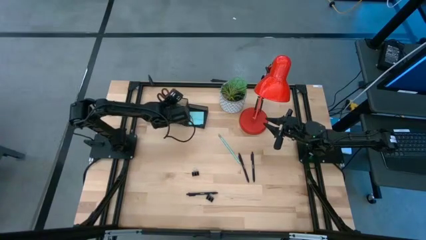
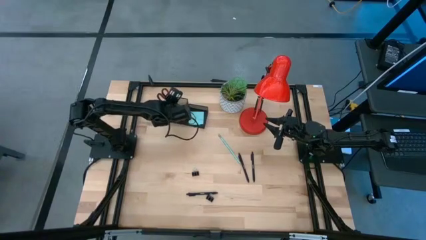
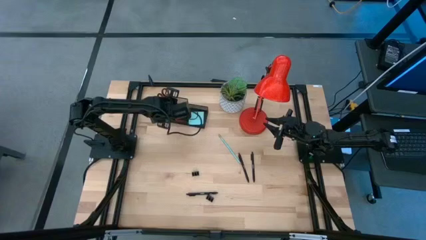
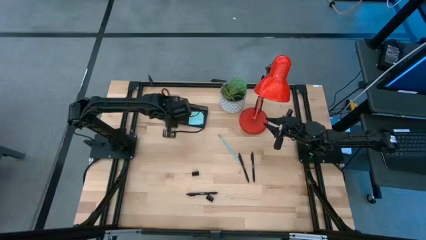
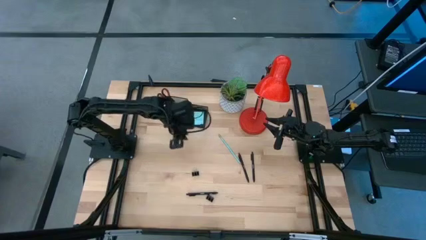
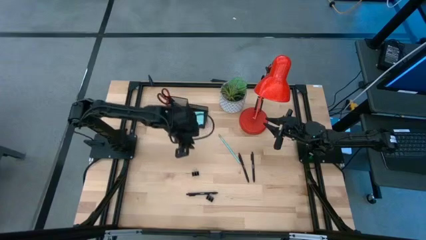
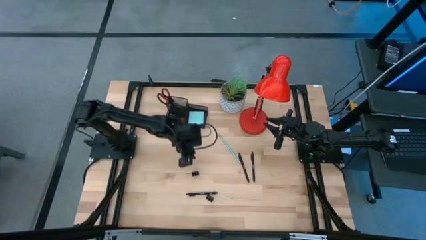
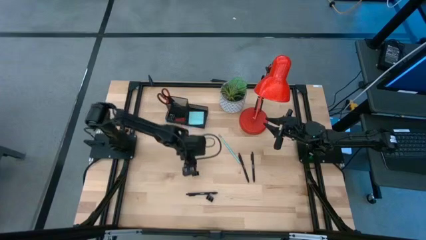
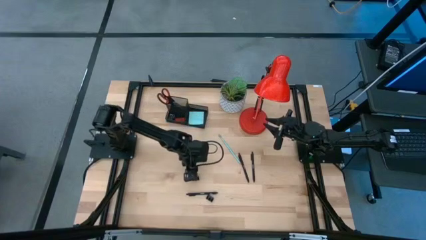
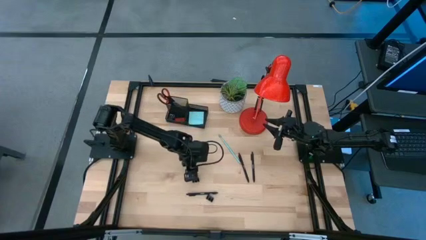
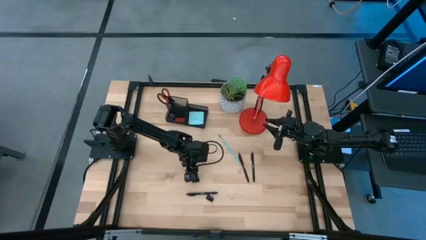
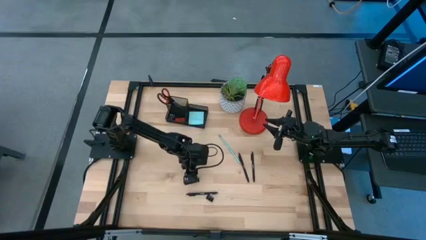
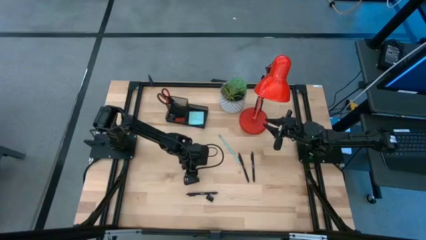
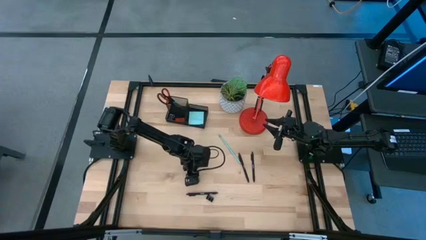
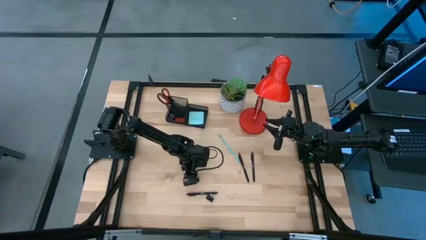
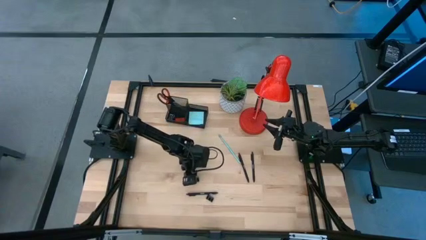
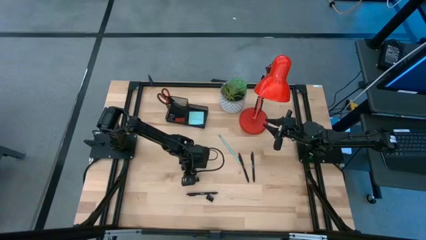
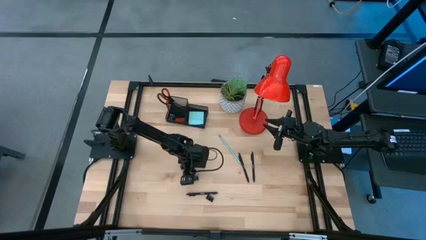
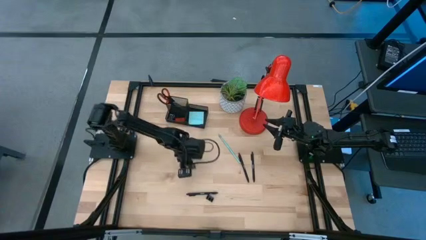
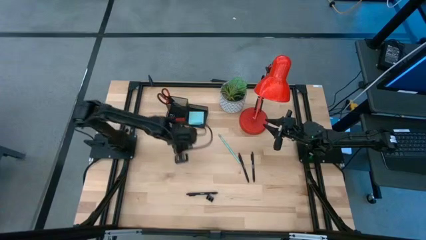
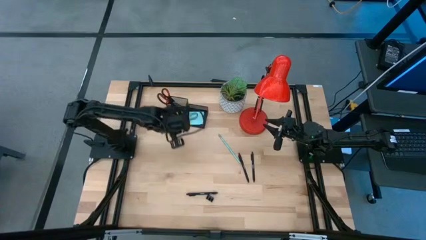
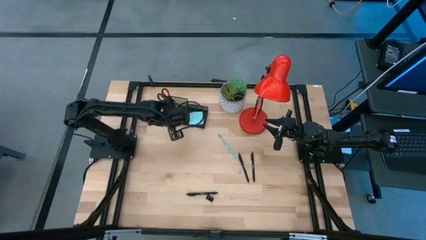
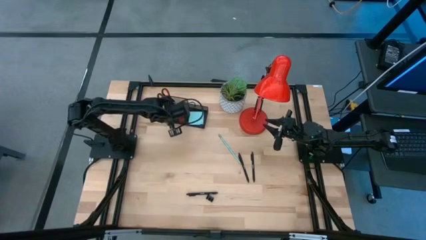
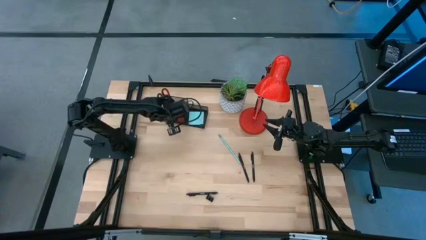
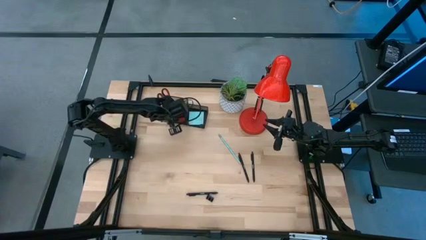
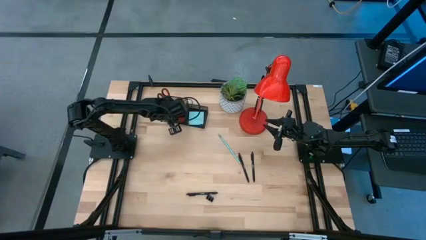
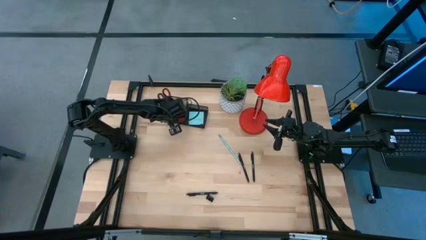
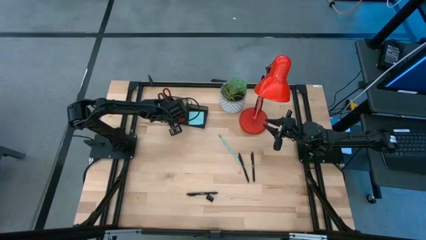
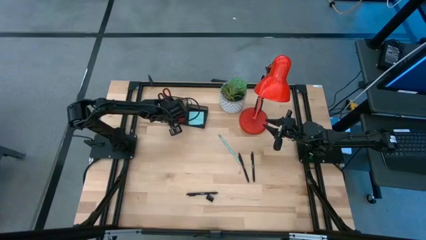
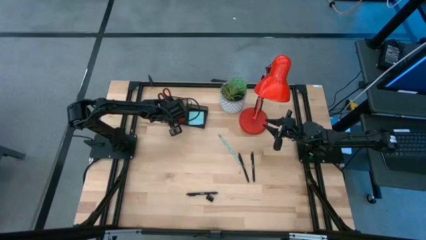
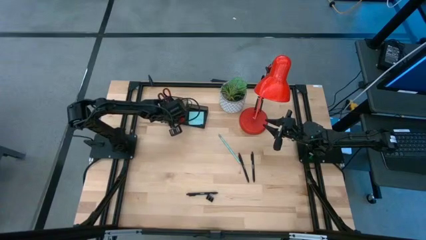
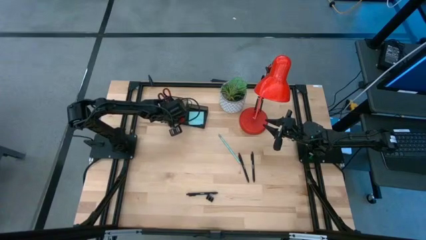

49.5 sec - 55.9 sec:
Task: Pick and place office supplies into organizer
Put the top black binder clip into the black desk organizer

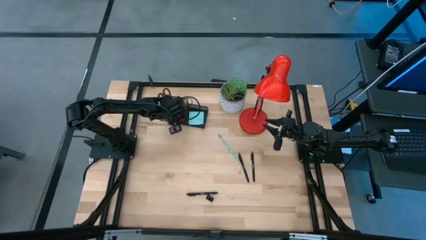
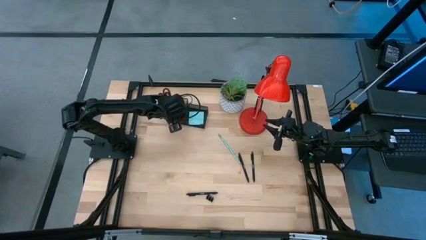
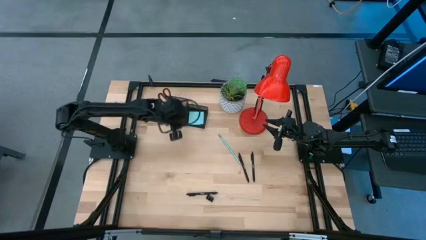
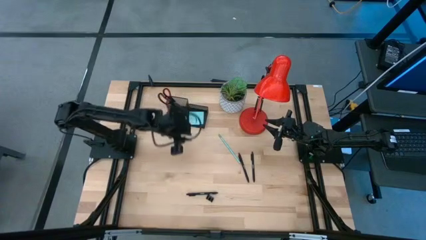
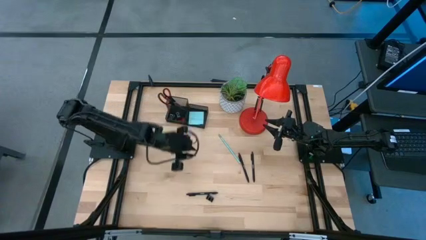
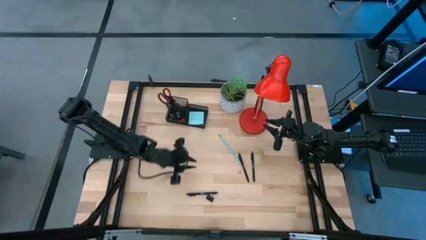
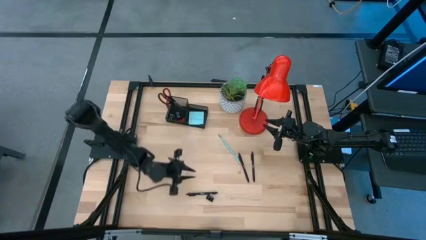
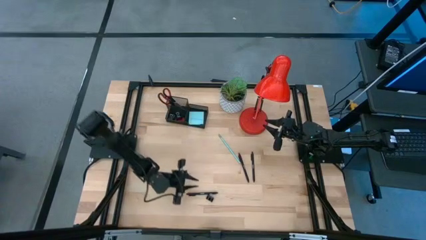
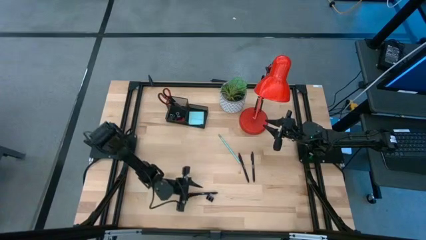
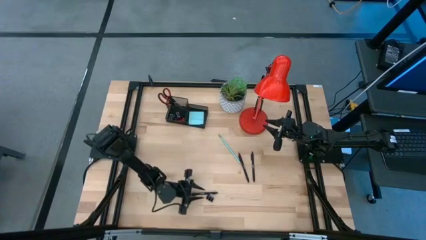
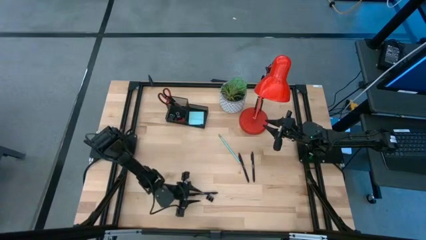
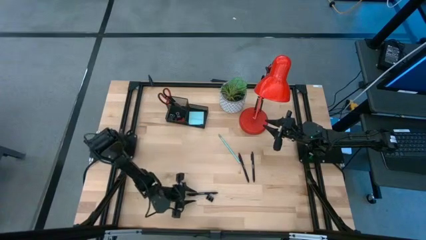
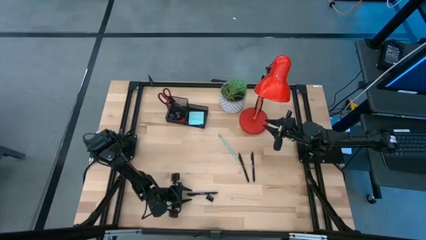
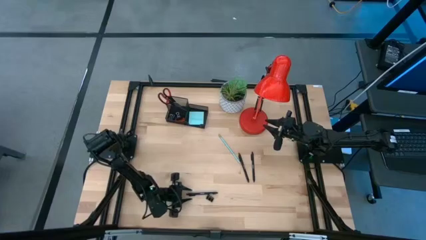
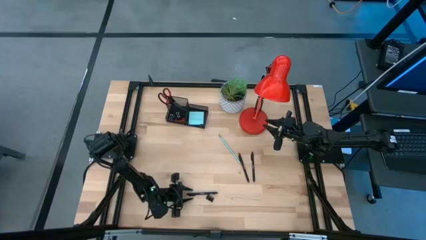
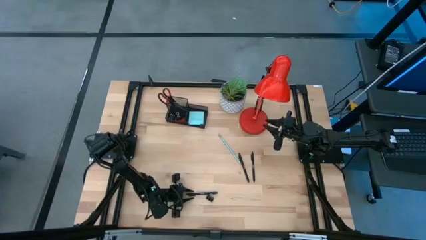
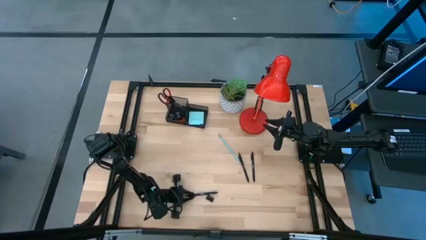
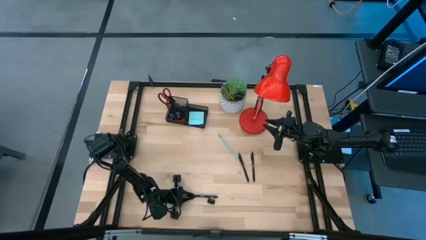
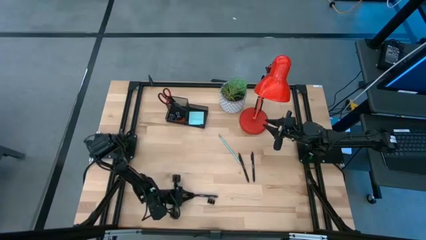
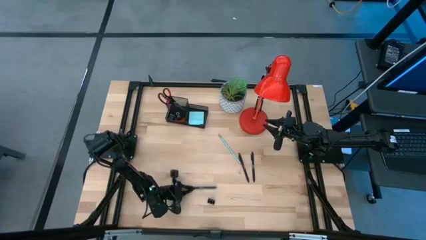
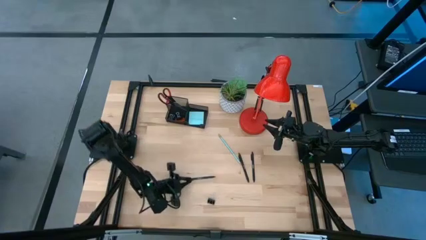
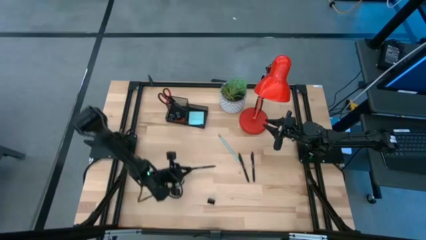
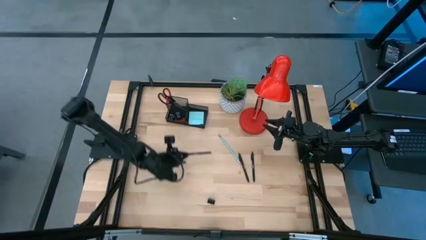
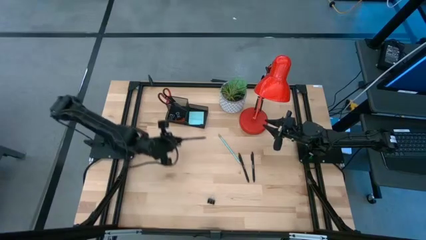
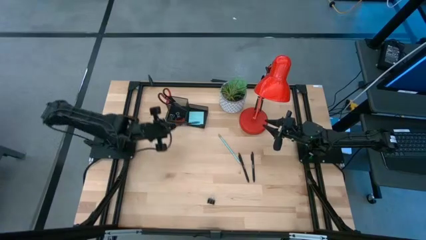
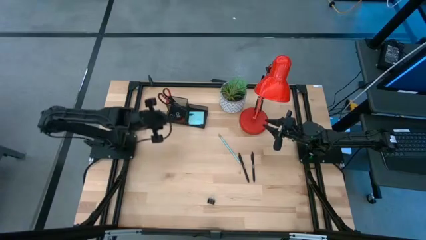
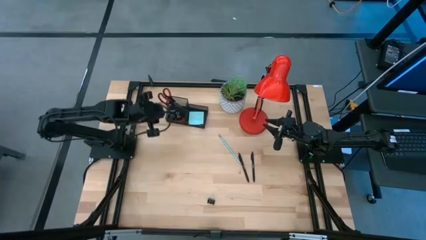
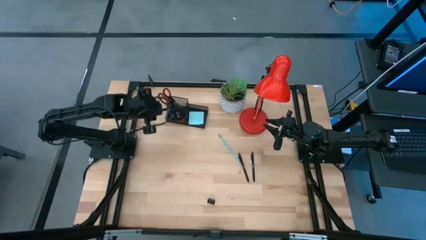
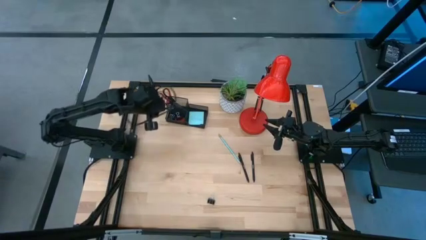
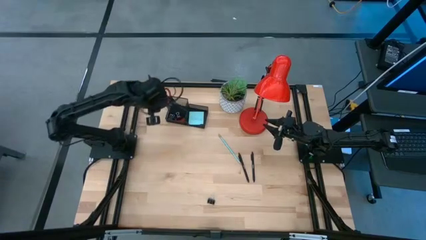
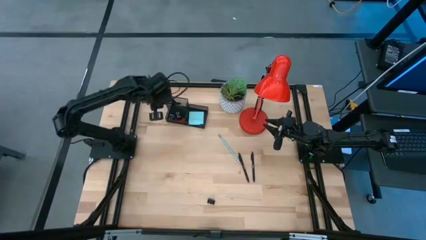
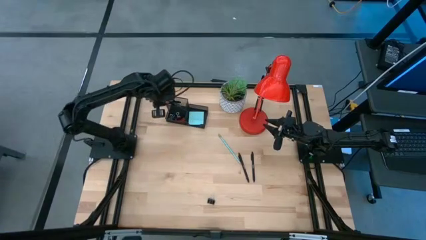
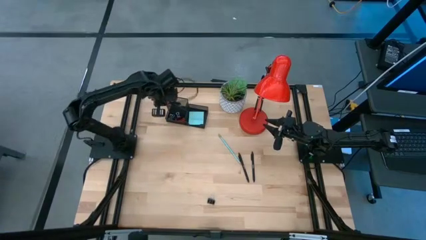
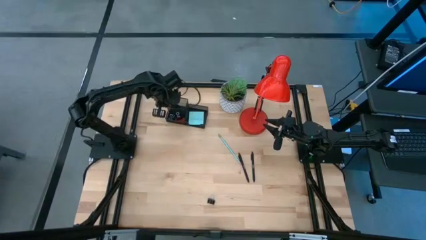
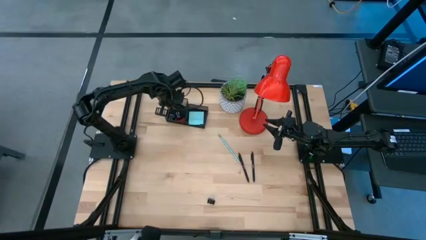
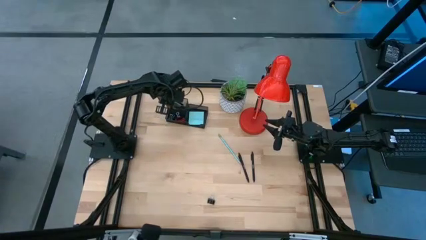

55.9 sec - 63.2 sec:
Put the bottom black pen into the black desk organizer

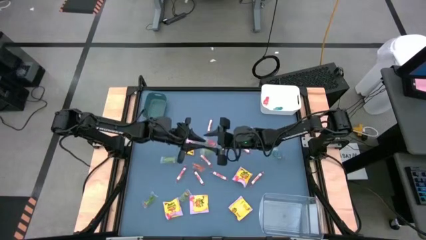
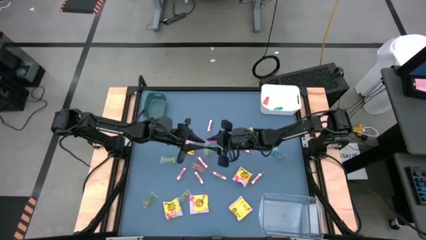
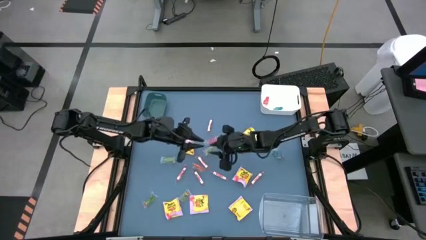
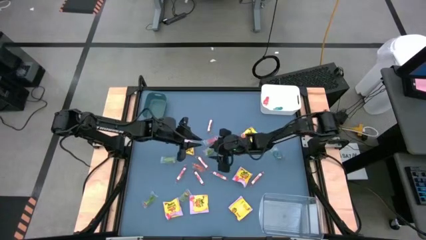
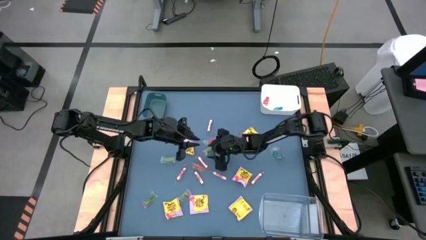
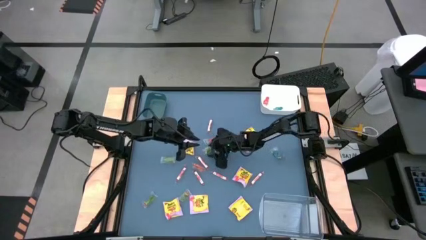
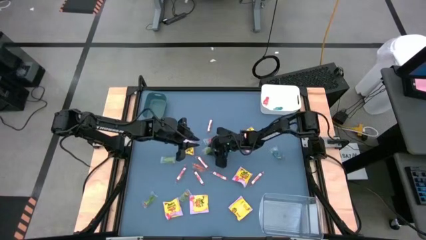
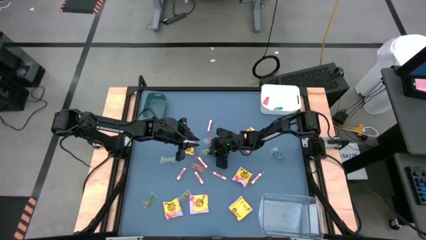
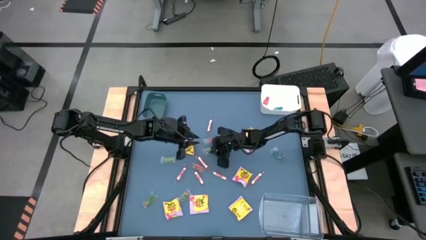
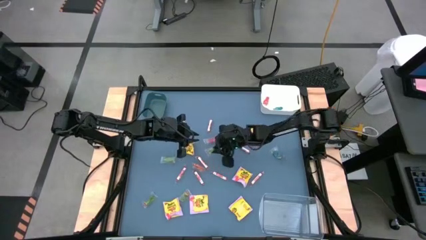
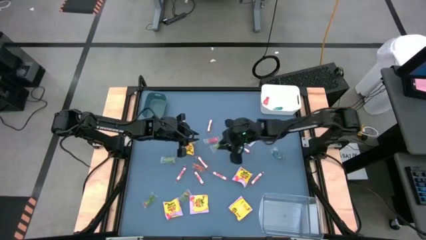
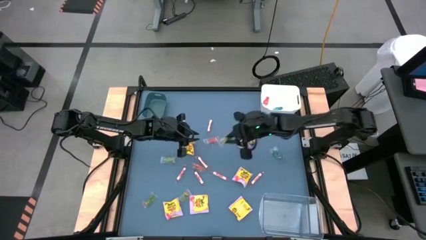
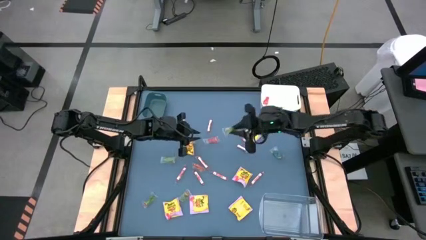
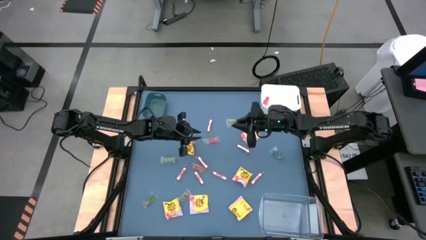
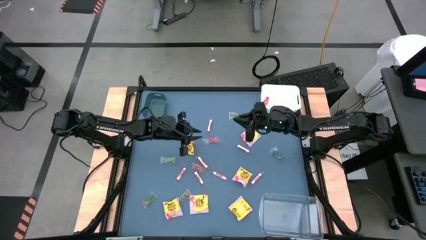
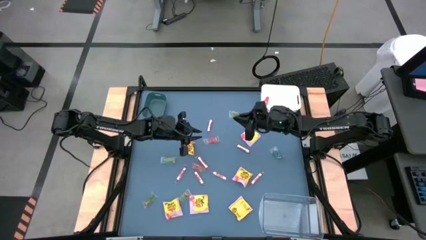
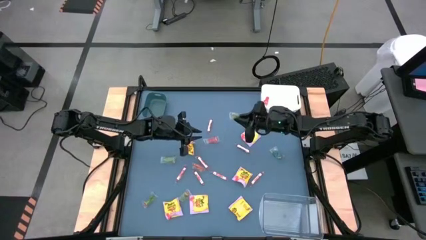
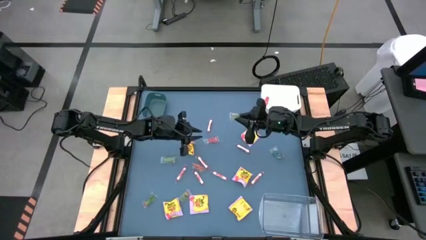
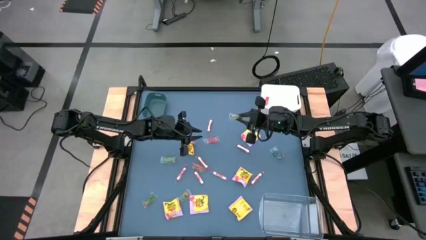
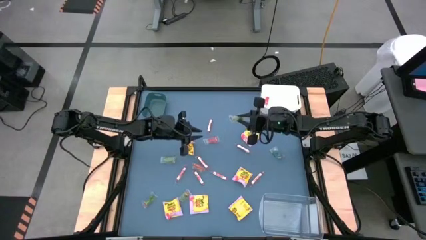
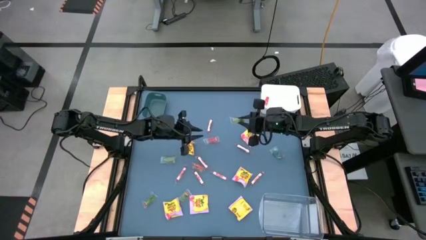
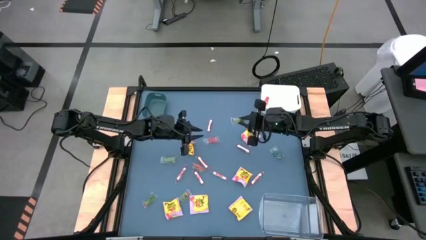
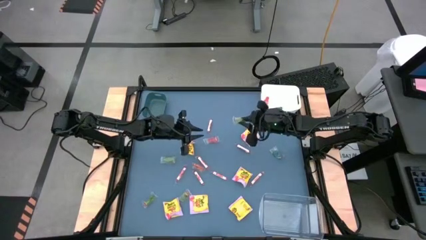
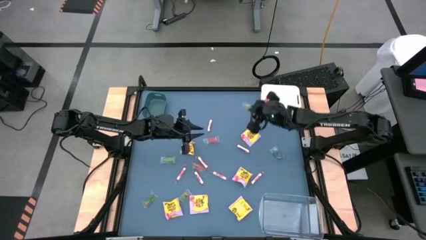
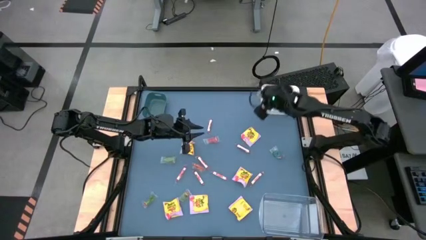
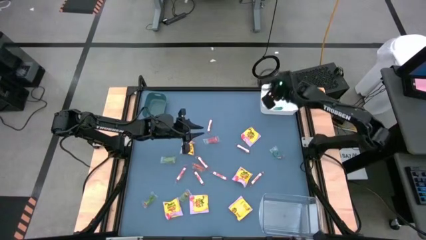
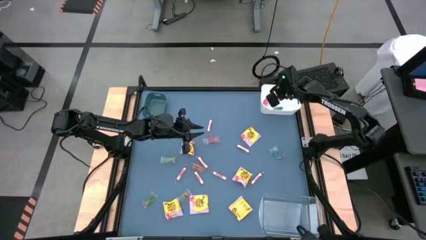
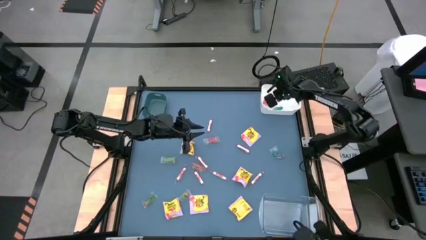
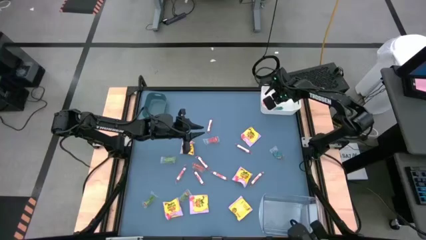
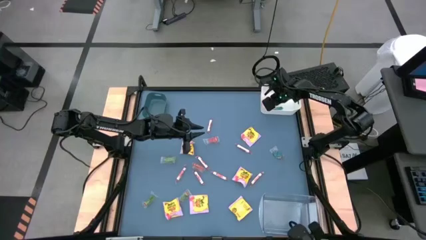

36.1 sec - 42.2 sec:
Task: Sort candy
Put the green gummy into the white bin
